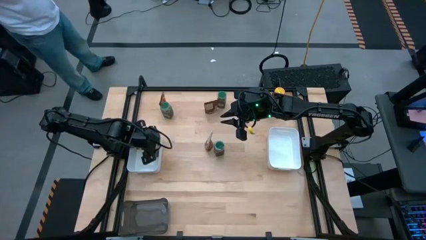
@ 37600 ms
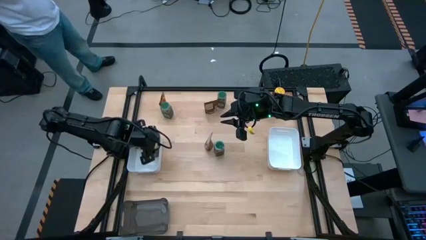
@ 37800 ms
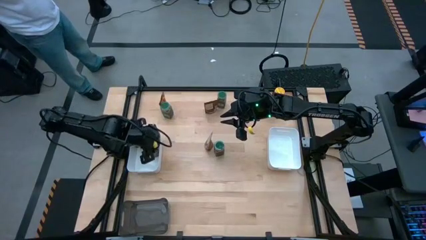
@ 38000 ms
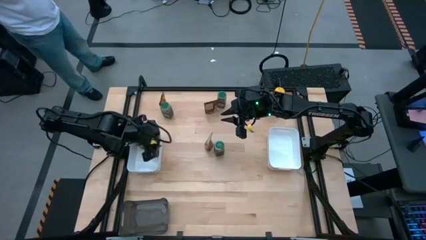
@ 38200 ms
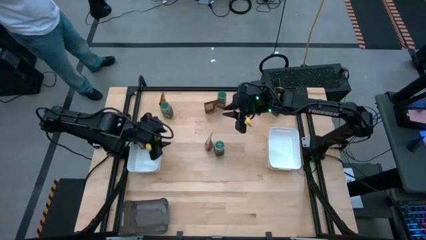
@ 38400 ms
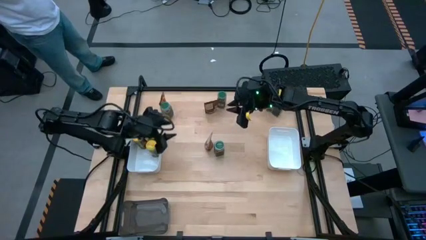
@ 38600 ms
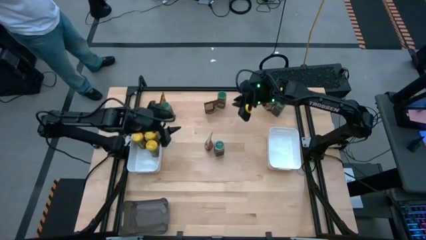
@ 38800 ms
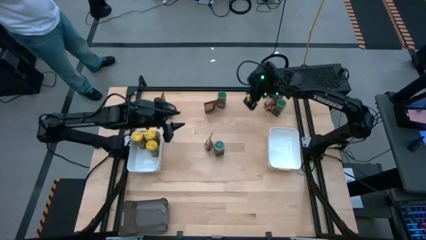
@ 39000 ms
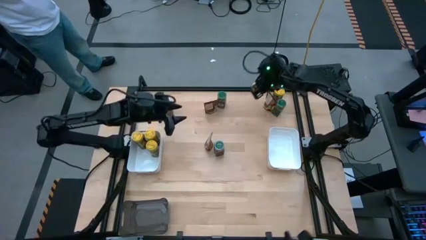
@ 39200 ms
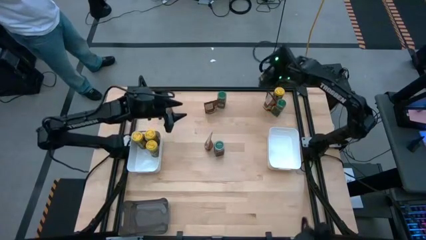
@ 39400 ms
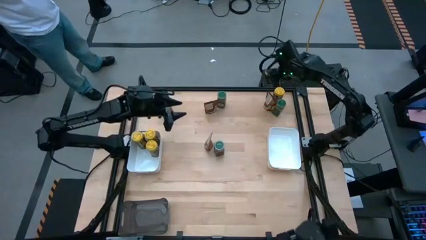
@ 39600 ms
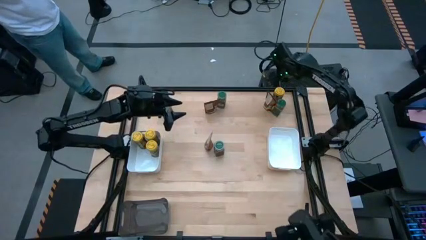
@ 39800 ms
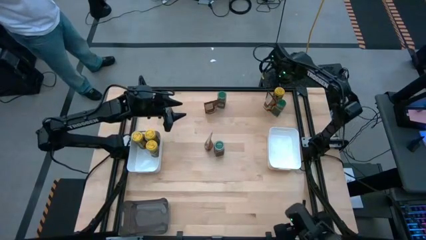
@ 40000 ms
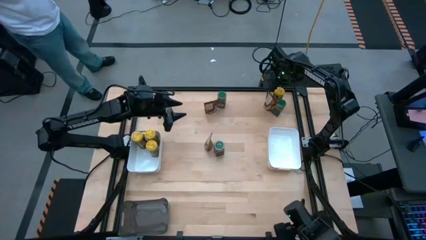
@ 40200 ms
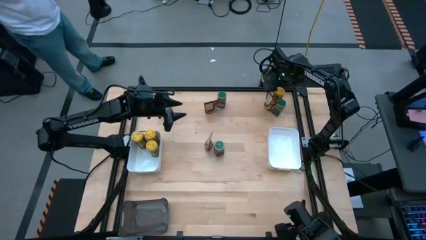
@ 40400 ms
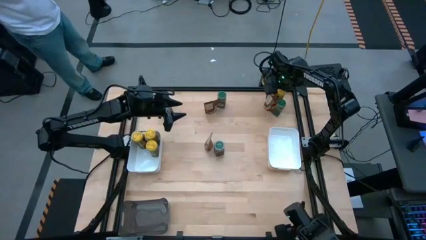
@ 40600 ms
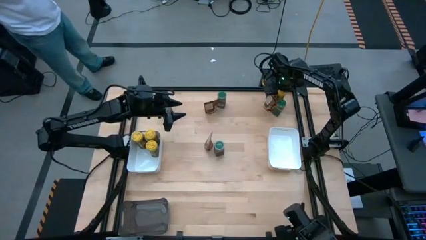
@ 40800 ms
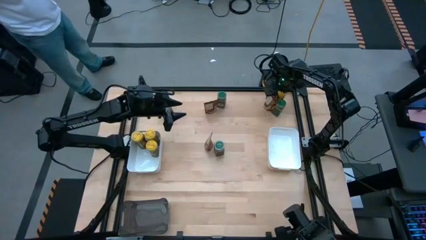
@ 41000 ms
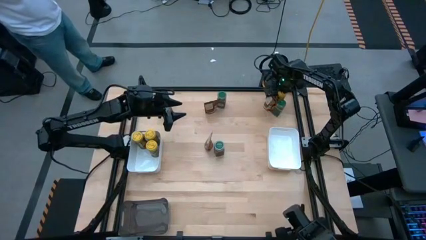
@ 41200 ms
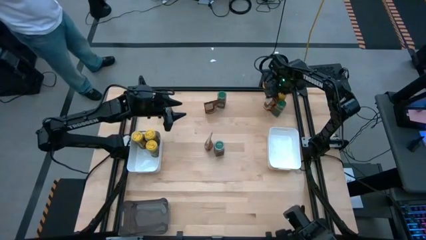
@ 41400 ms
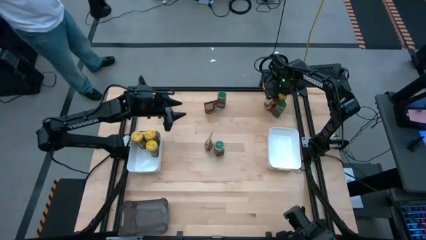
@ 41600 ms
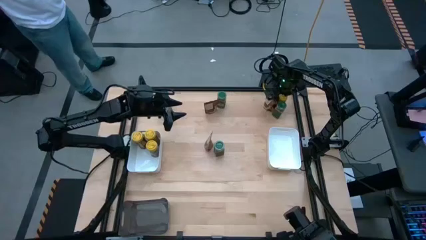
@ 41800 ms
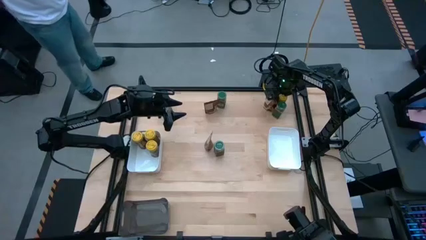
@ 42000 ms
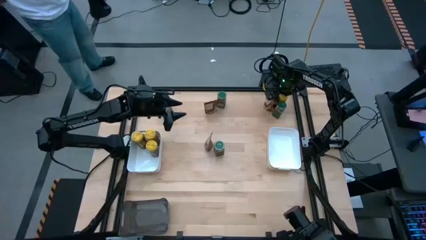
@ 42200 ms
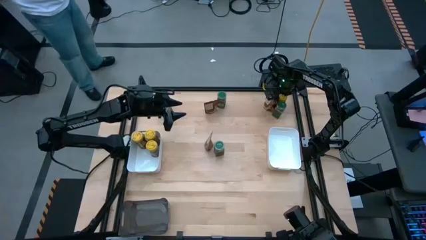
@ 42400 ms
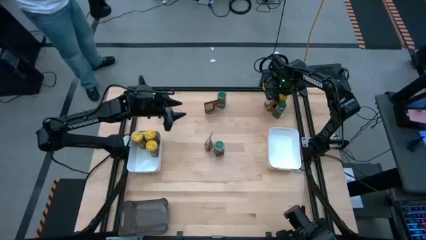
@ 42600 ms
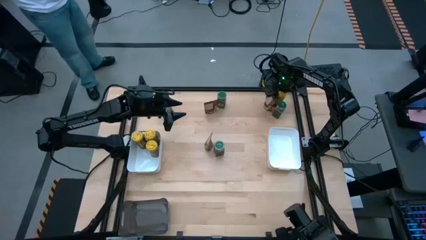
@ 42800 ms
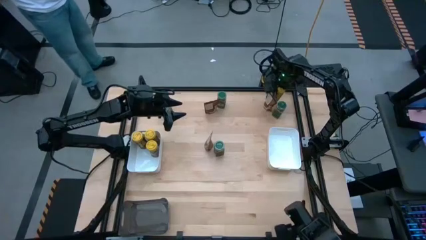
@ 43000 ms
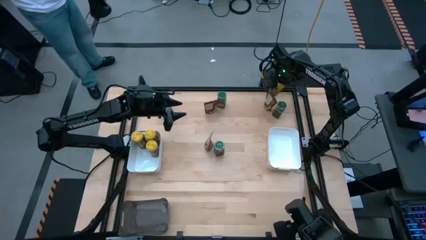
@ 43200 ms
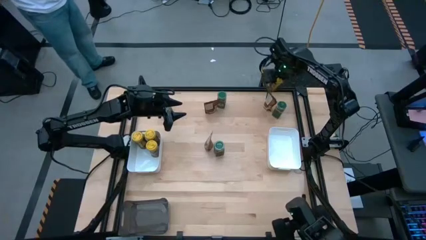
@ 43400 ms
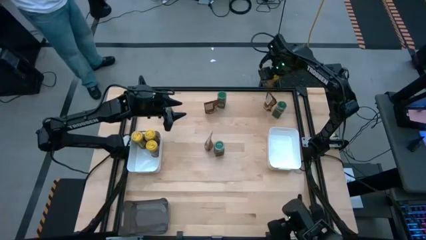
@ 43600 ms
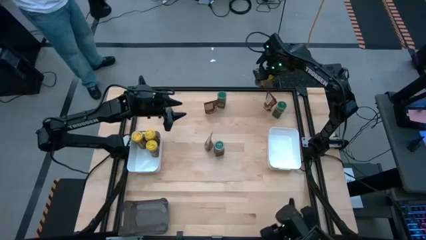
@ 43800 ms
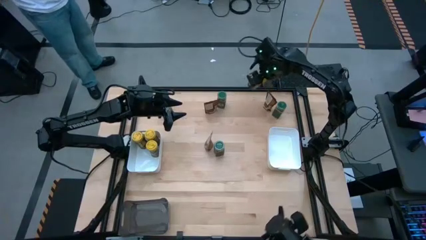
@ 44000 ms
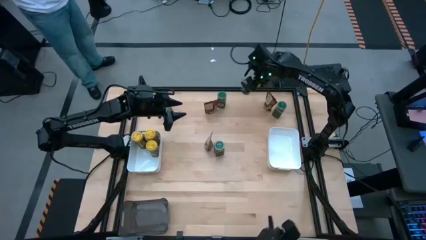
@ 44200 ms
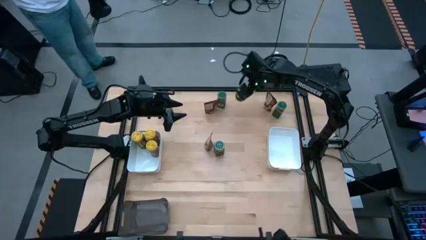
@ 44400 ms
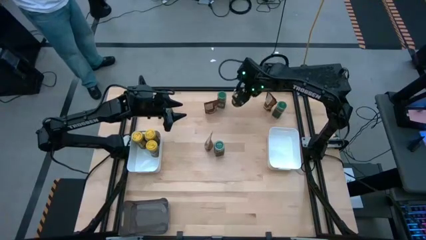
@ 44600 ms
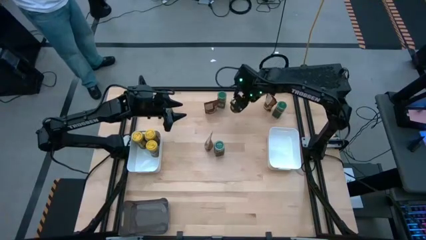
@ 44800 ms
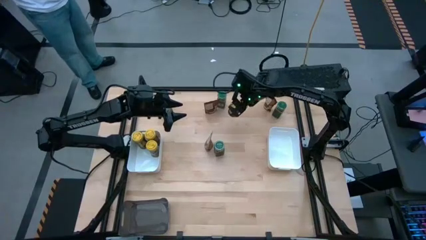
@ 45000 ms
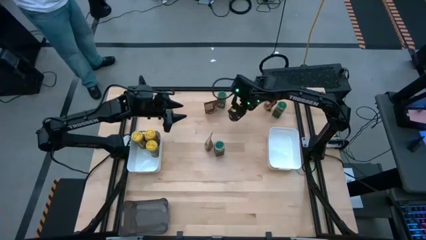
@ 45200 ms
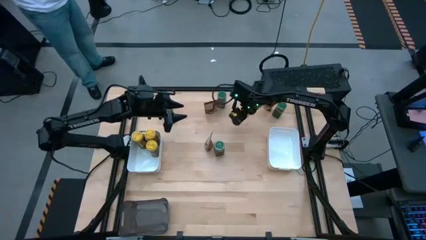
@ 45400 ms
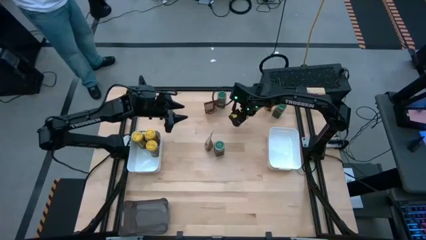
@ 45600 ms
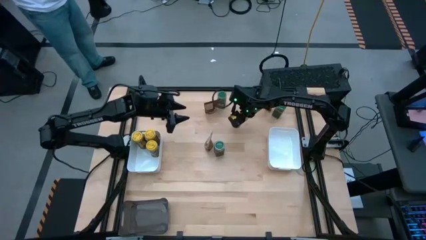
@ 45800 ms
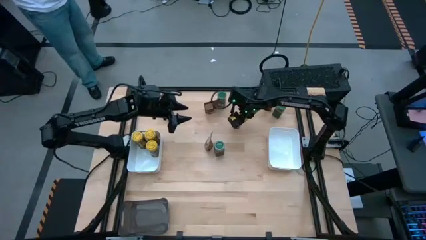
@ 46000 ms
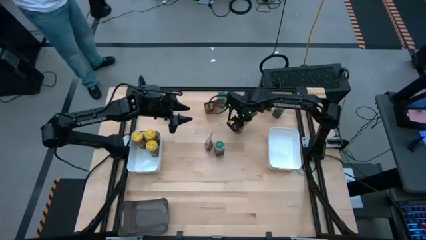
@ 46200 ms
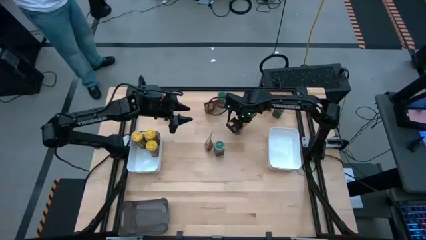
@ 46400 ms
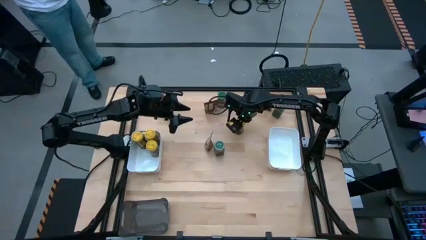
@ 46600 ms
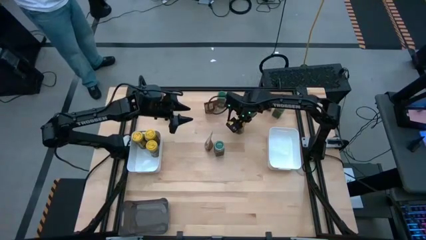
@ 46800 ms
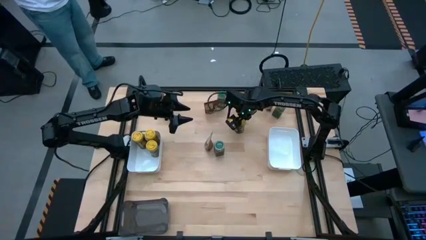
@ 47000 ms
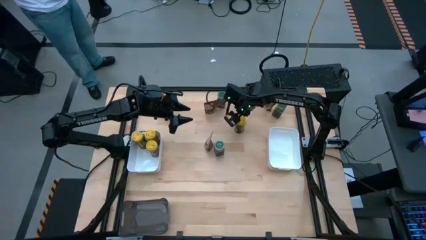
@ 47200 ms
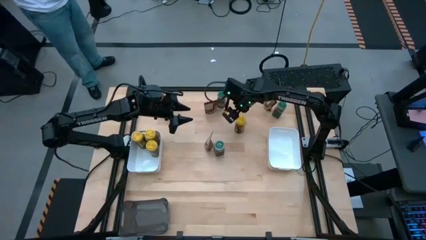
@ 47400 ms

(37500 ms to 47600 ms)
Task: Sort spices by type
Put the yellow seasoning bottle into the left white bin

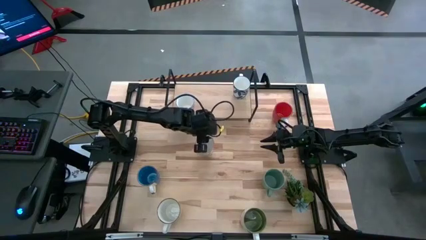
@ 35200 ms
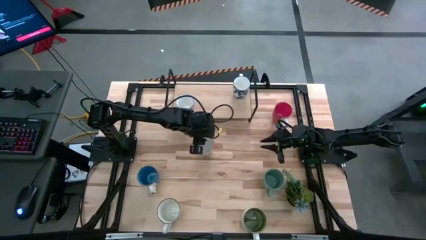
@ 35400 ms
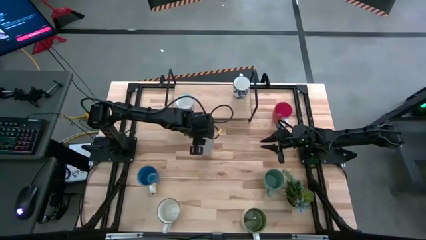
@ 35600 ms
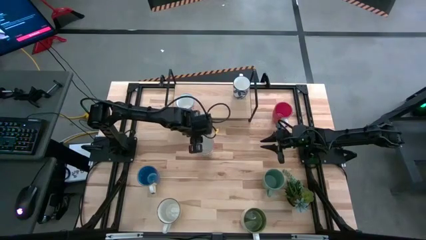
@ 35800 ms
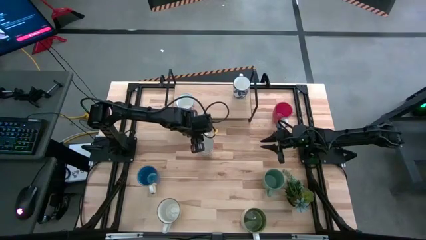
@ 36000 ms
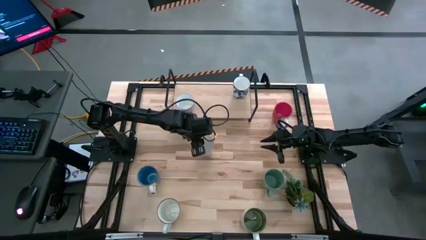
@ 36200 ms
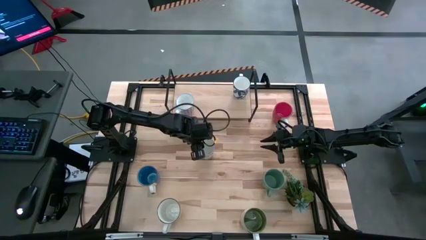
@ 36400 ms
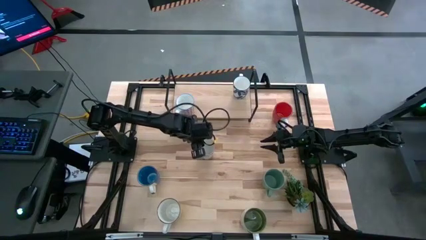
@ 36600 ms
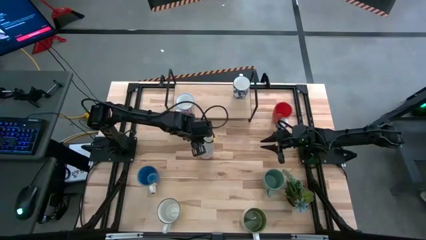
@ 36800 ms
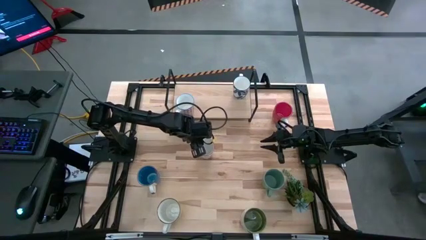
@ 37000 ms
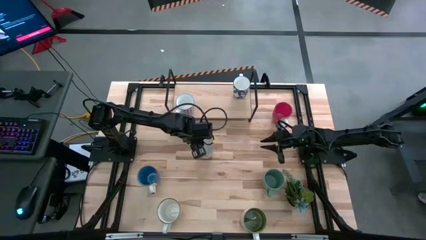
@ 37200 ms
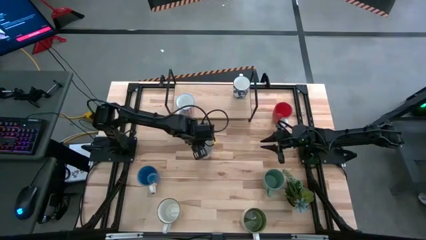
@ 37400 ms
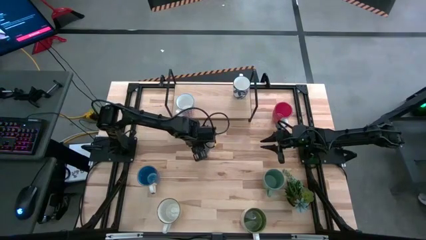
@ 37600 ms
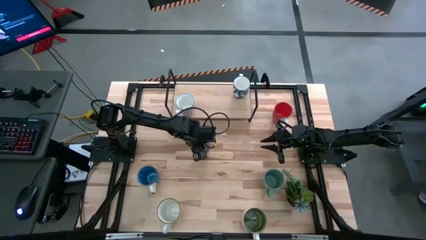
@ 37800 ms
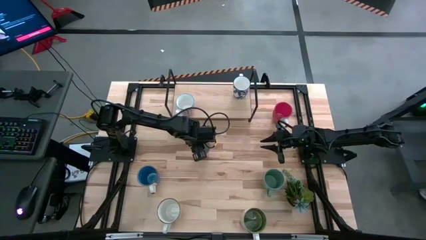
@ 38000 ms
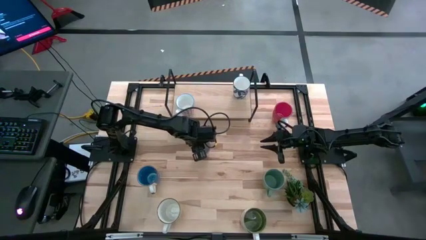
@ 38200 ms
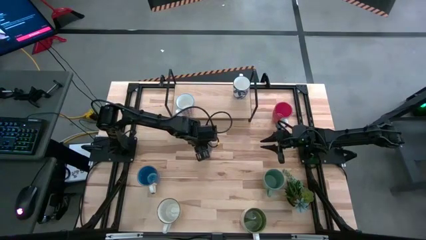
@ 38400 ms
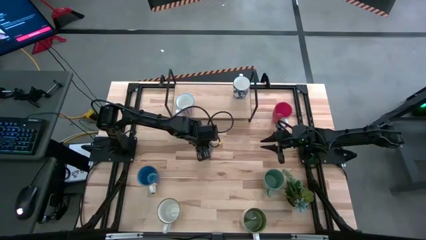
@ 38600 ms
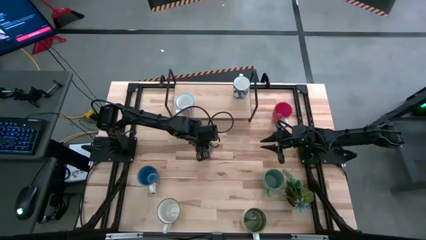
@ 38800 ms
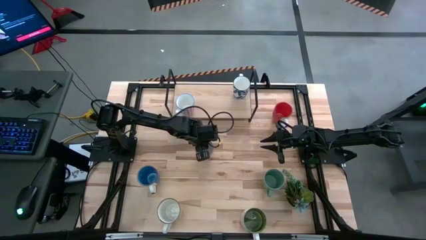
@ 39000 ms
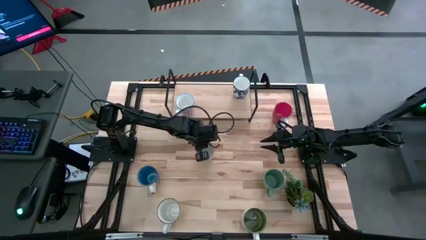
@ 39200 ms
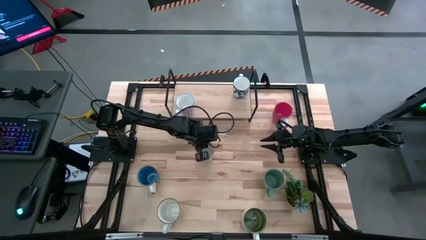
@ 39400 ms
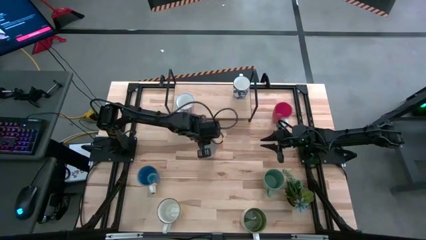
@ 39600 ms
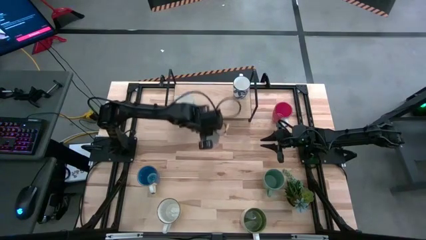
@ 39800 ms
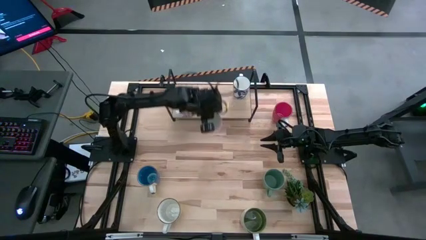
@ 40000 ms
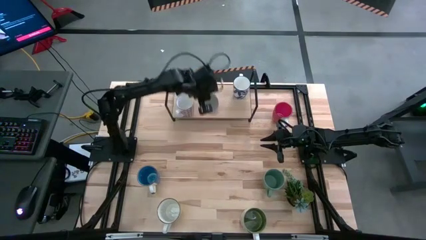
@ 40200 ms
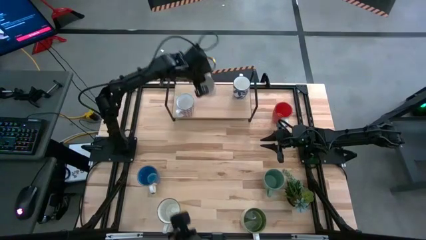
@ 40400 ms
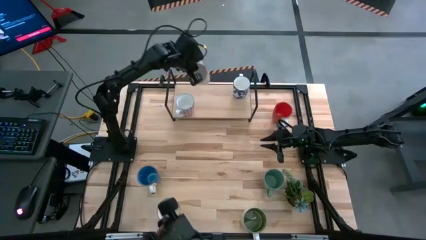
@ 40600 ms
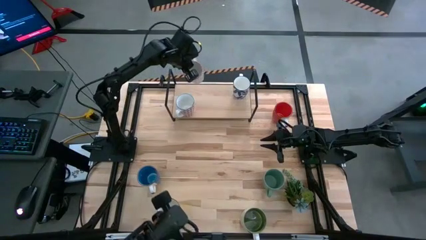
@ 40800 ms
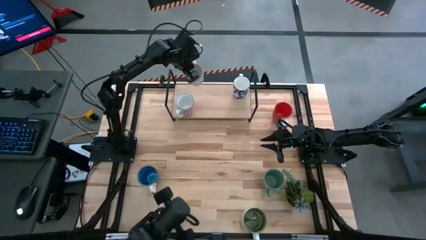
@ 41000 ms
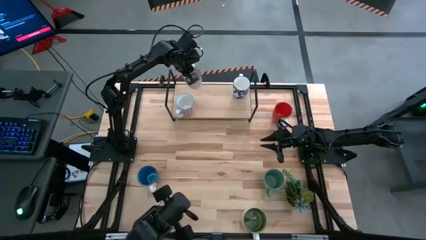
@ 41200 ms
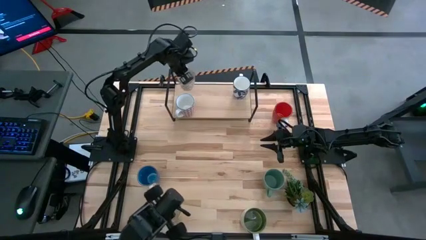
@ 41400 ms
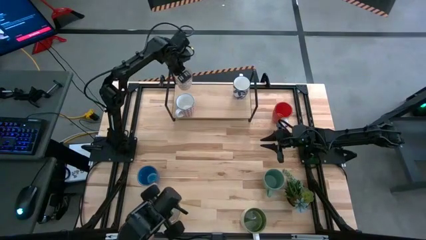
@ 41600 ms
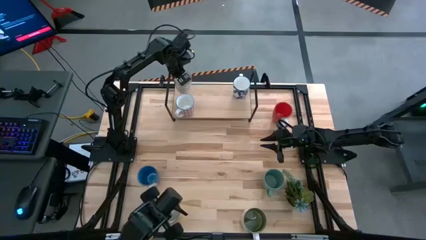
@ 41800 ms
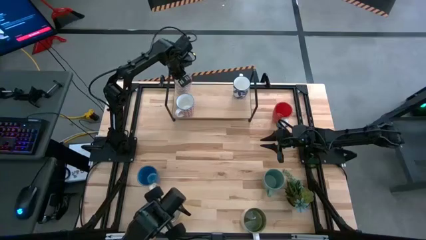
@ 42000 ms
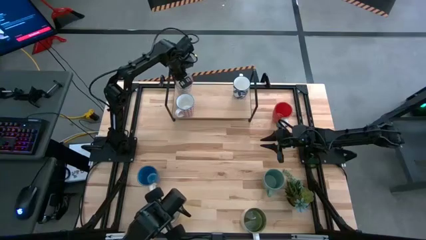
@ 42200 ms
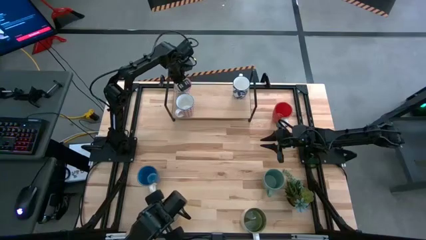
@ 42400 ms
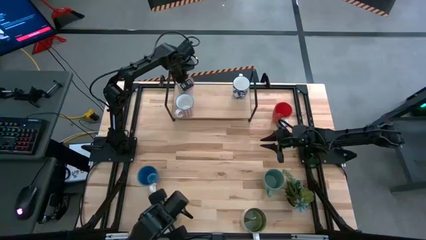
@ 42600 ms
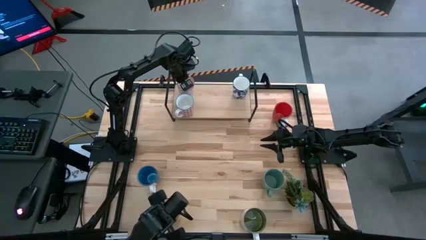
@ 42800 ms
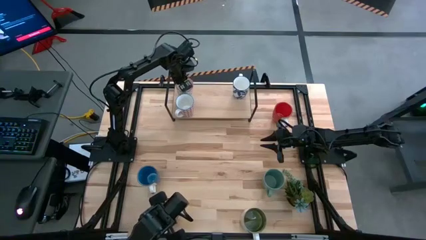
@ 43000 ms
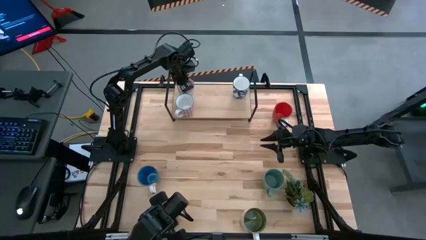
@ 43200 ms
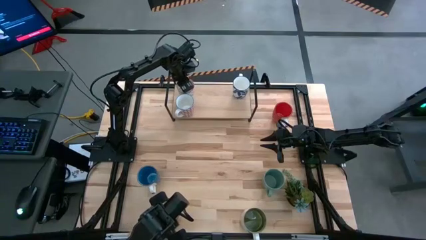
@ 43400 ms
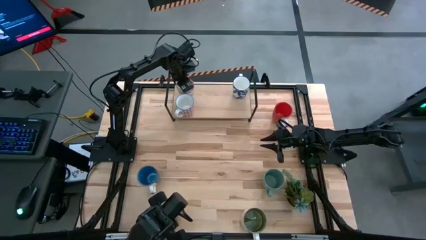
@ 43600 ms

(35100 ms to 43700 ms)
Task: Place coffee mugs
Put the gray patterned mug on the shelf
